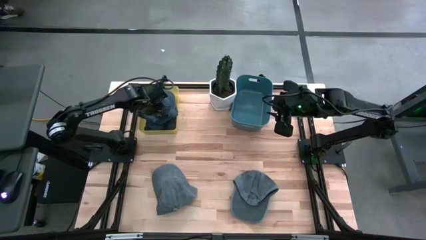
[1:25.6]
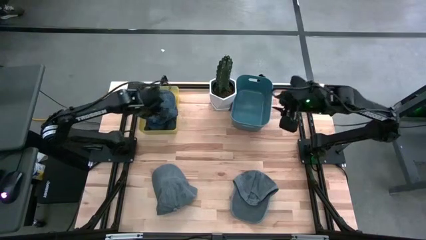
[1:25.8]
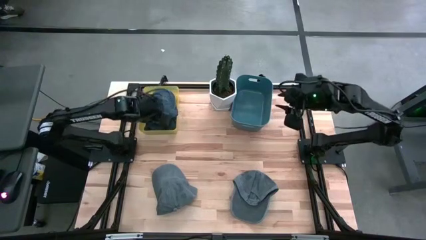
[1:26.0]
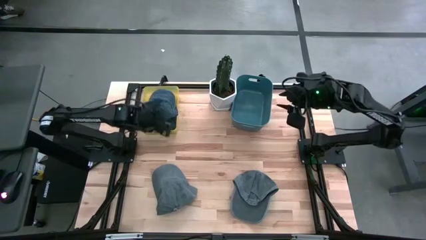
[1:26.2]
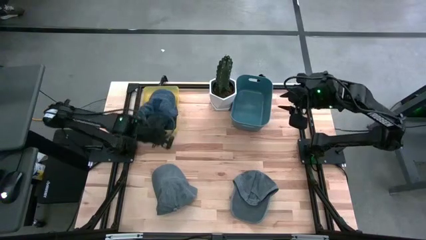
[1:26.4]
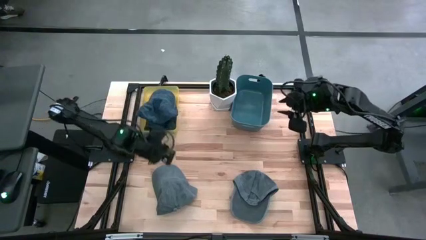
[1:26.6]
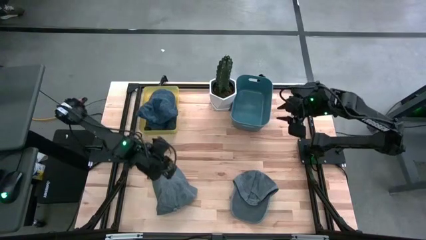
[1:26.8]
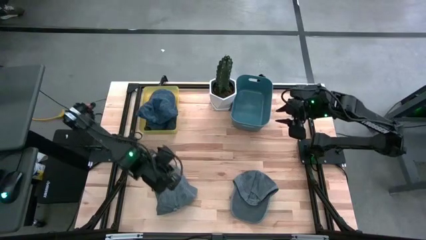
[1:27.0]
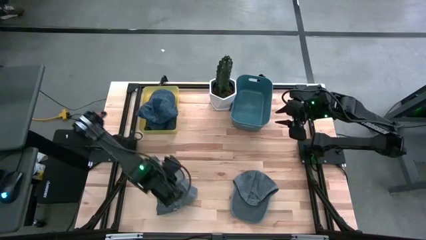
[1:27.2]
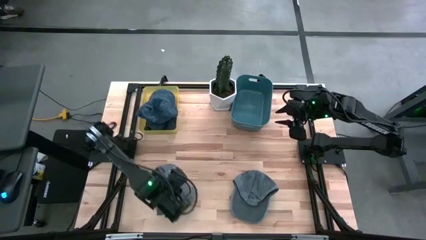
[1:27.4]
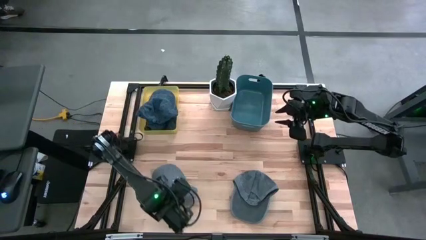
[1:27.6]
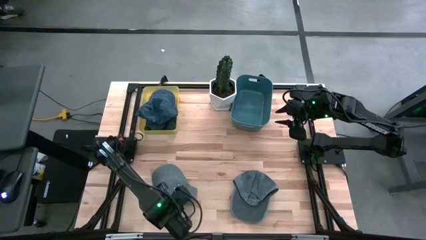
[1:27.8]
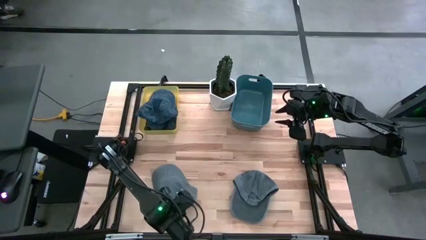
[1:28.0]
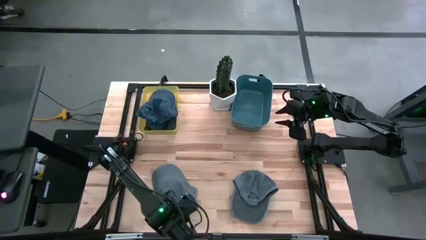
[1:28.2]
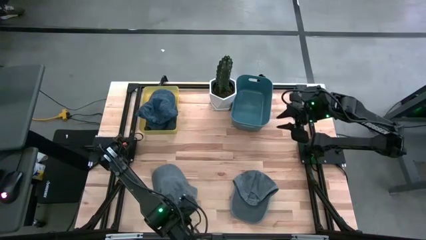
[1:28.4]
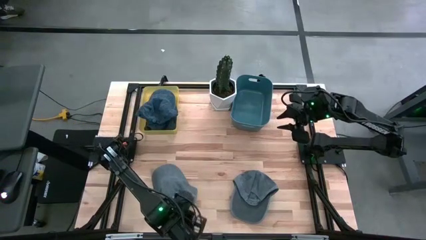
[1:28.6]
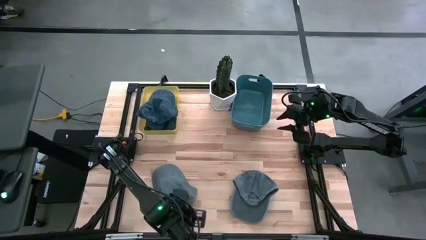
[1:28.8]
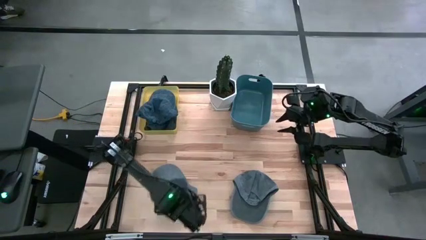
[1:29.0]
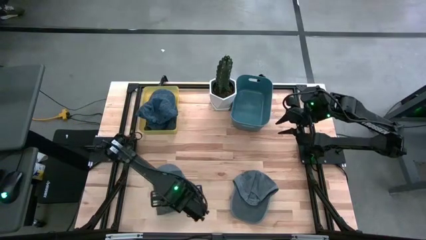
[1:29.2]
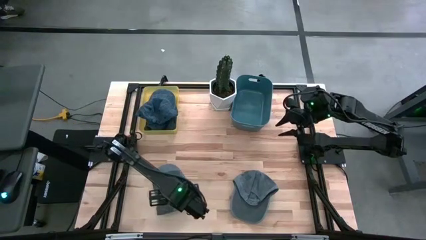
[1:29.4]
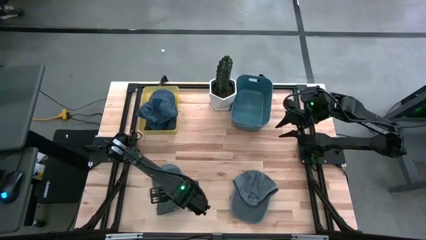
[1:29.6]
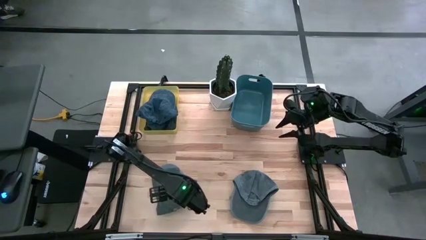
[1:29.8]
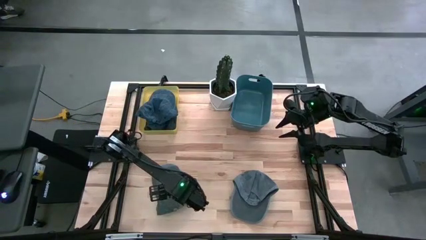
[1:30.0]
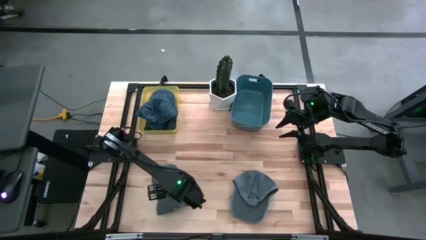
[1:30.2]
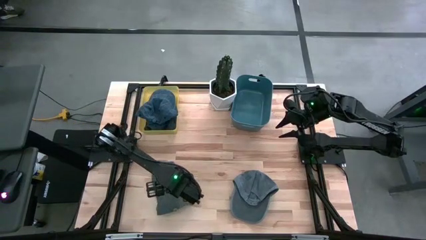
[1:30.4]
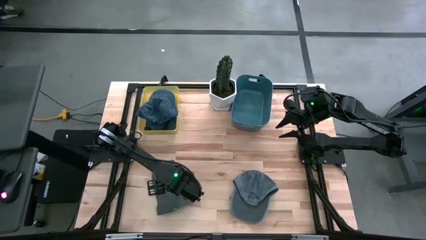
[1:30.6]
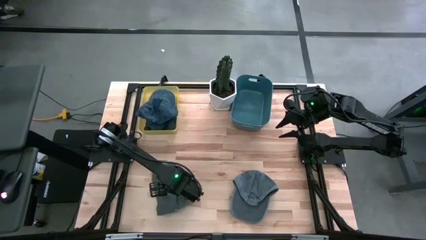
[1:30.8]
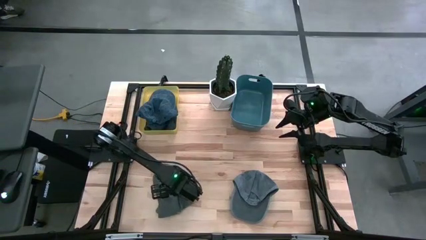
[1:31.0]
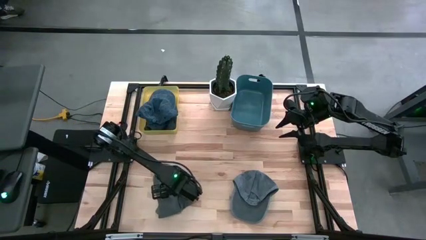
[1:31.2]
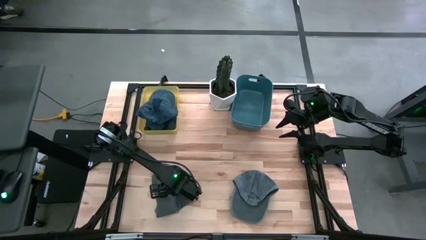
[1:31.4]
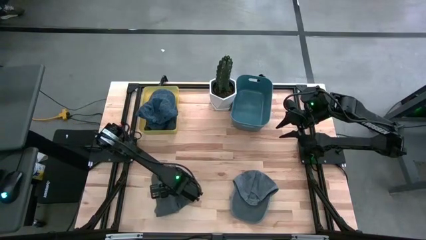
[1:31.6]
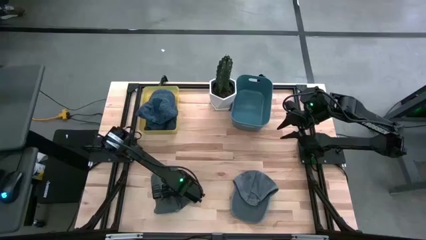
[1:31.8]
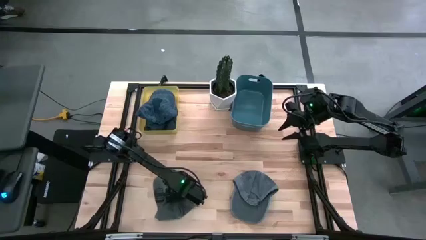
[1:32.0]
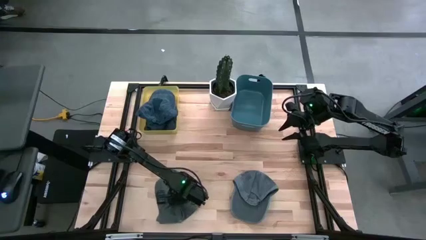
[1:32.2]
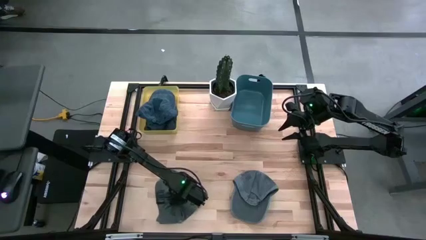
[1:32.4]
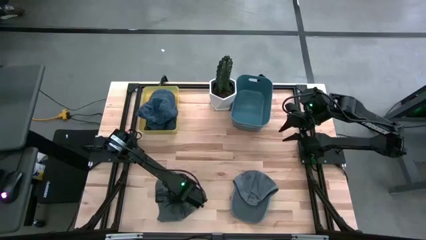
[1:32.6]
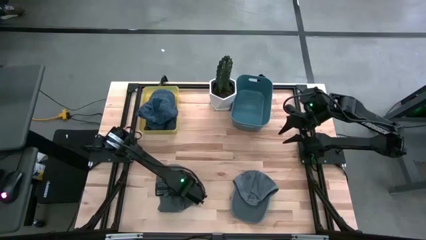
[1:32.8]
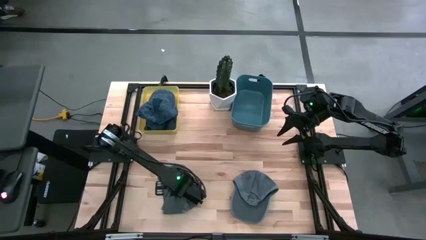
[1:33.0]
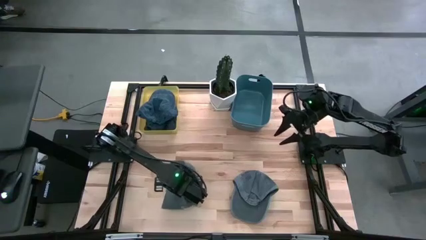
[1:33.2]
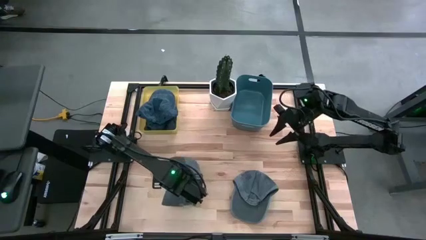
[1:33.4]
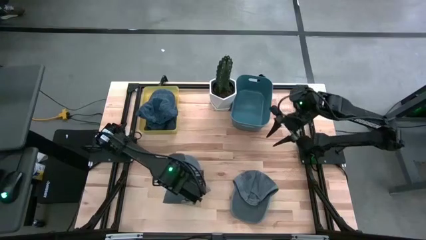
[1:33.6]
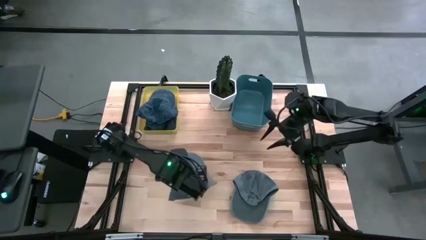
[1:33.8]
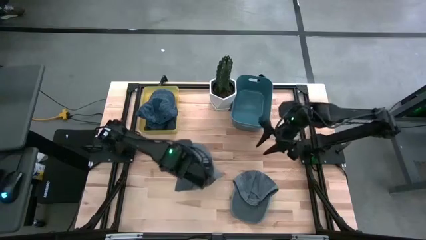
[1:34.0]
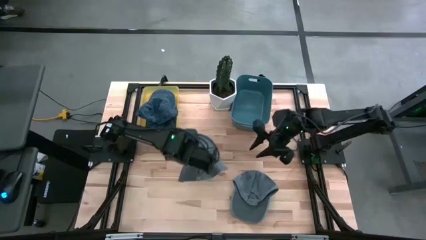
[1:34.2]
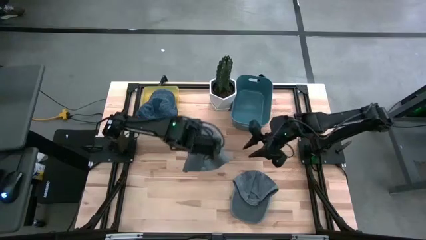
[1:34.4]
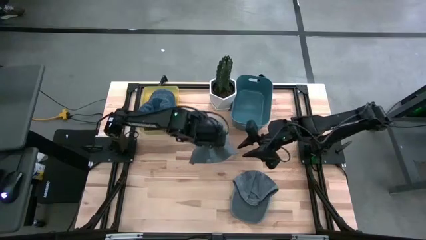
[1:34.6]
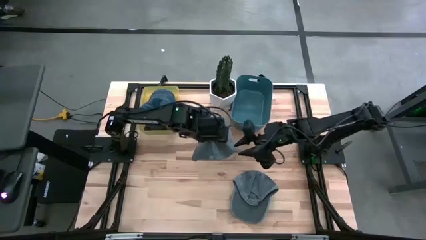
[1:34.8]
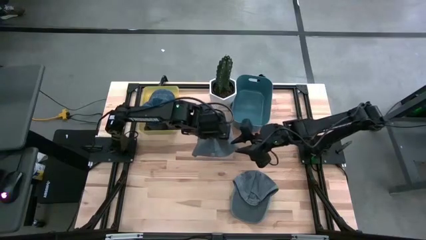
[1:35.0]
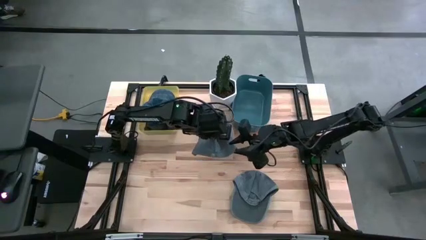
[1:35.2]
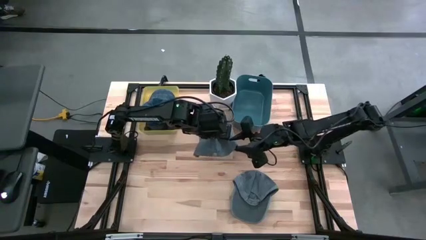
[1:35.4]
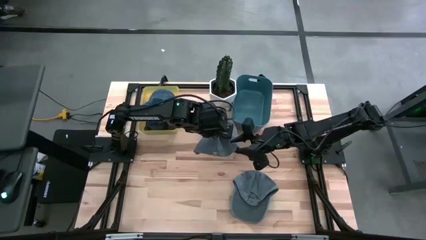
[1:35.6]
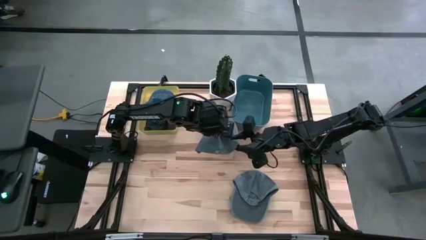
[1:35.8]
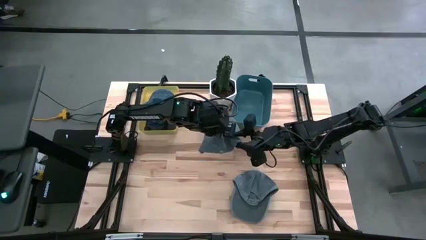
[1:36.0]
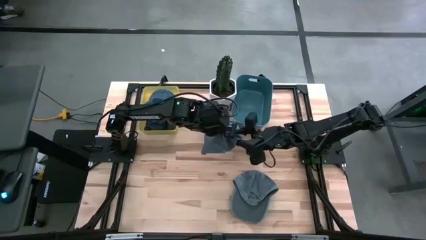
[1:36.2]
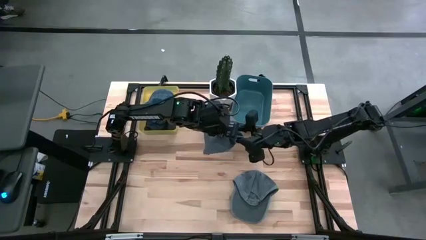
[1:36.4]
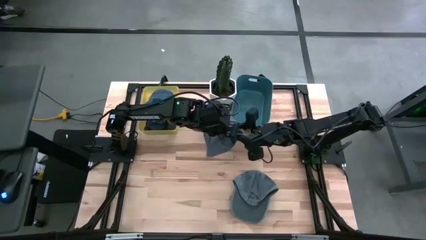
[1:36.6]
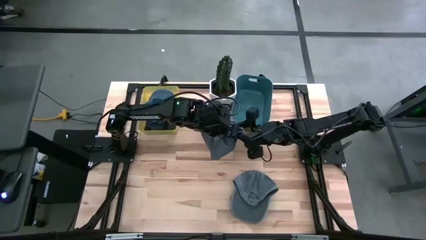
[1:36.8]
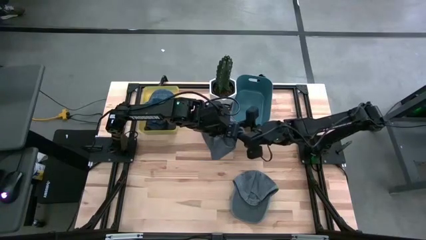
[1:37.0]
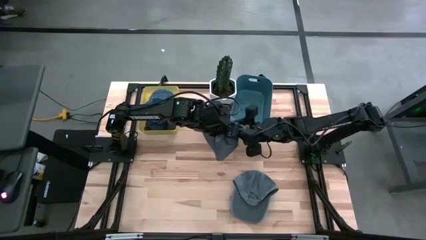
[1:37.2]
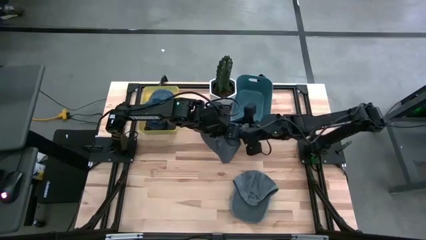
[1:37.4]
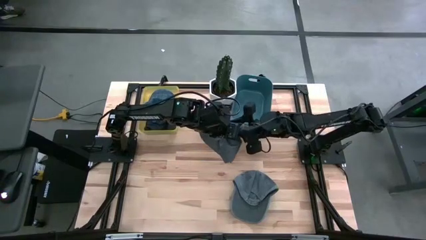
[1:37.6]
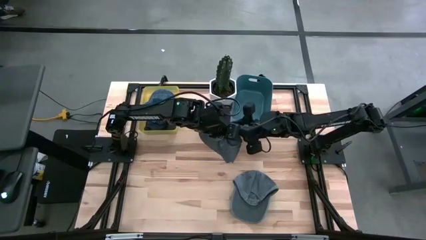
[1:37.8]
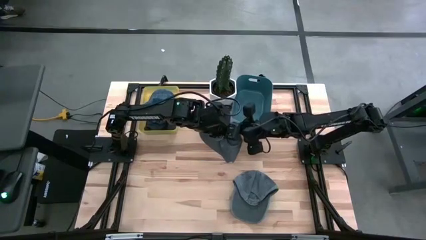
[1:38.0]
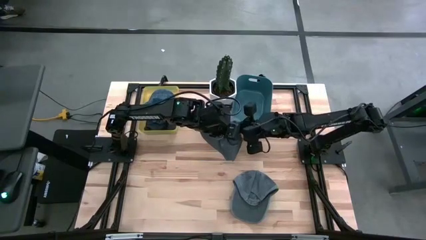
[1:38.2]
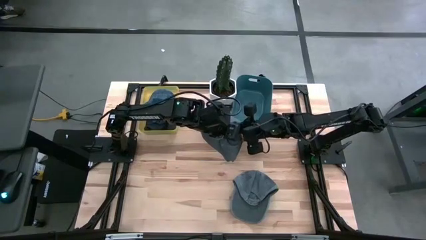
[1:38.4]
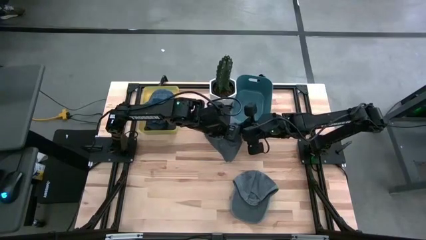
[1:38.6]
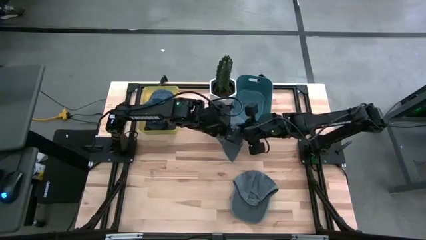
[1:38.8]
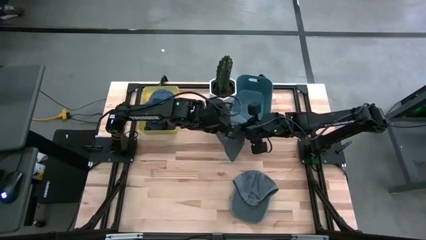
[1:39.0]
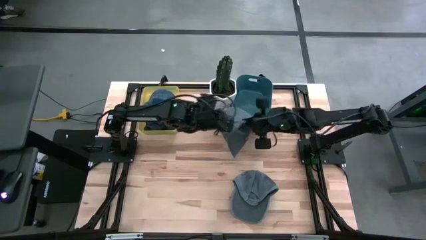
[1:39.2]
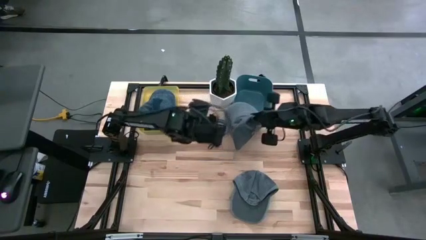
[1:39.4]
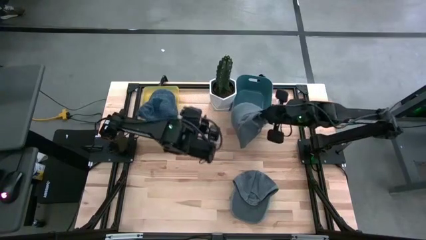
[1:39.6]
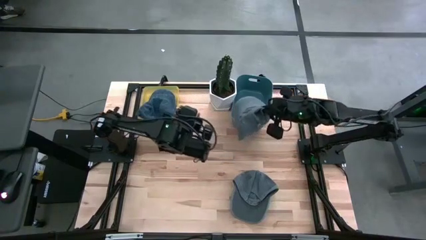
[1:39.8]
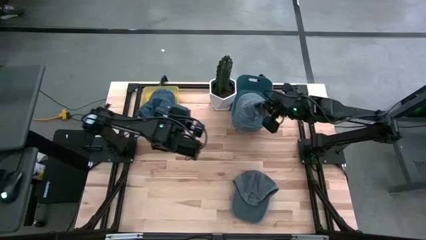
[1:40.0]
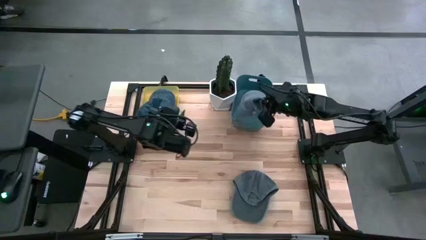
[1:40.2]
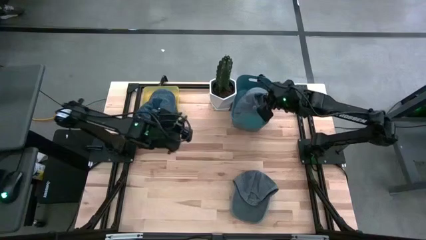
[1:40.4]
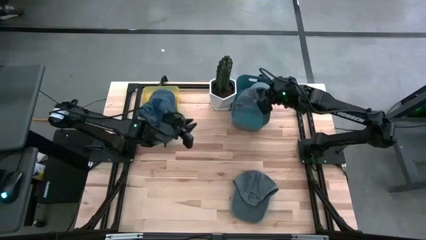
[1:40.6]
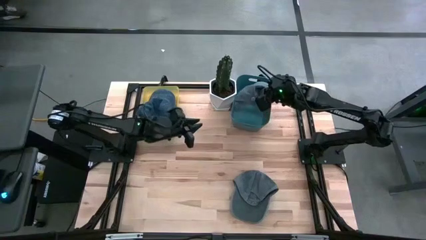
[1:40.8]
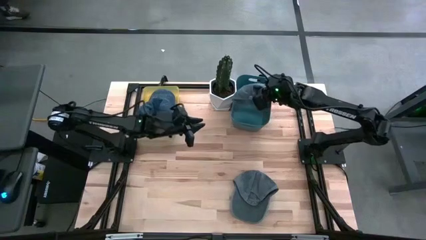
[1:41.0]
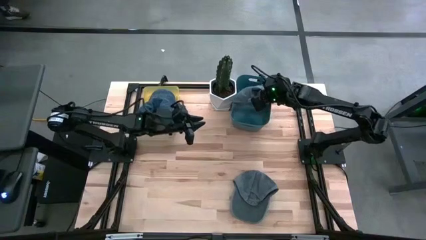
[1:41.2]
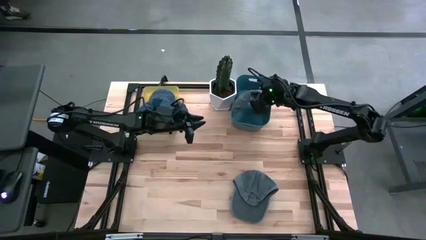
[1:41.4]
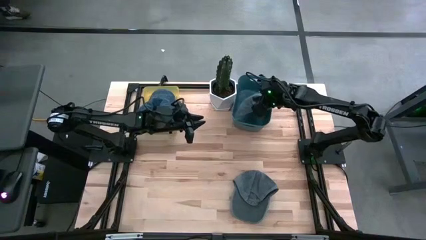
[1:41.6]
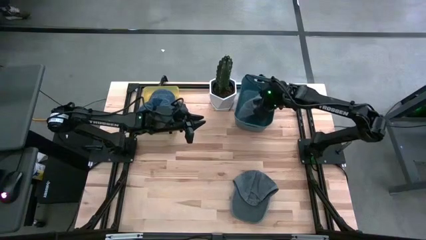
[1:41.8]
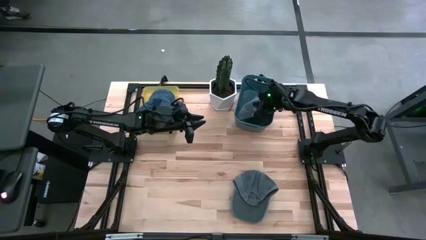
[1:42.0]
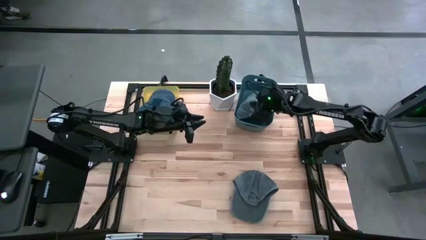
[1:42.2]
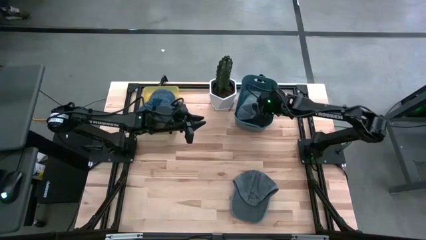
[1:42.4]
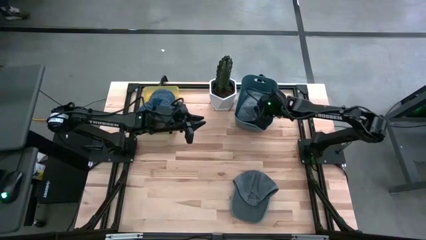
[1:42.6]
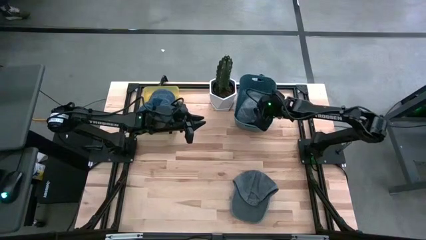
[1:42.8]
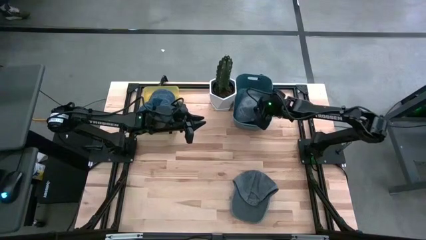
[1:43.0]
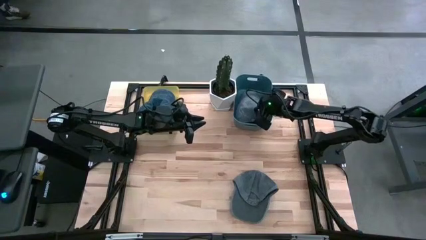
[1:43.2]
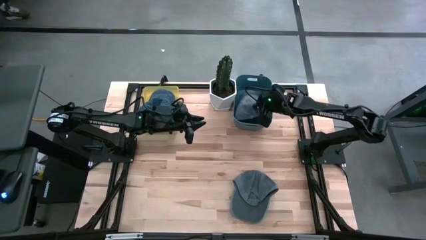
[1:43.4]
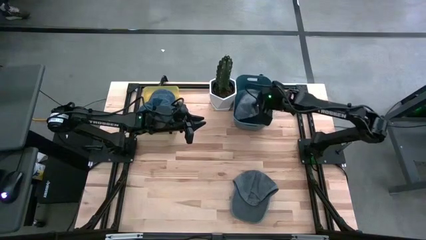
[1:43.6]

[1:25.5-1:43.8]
Task: Pick & Place hat
Put the left gray cap into the blue bin
